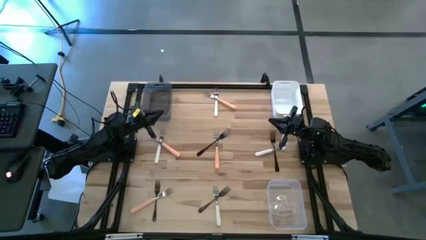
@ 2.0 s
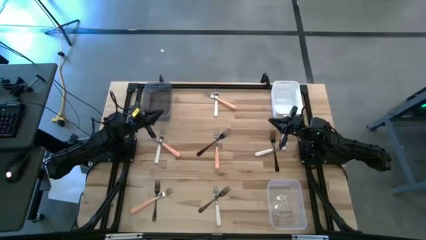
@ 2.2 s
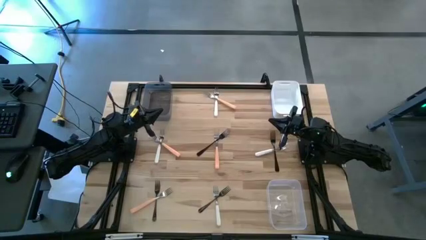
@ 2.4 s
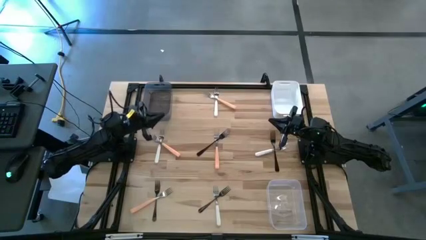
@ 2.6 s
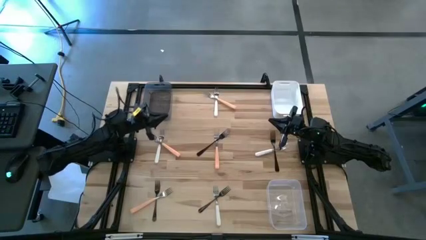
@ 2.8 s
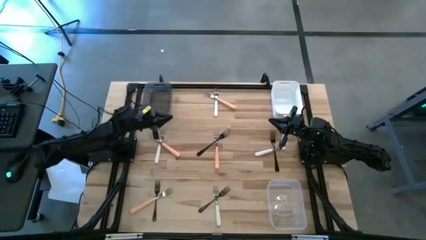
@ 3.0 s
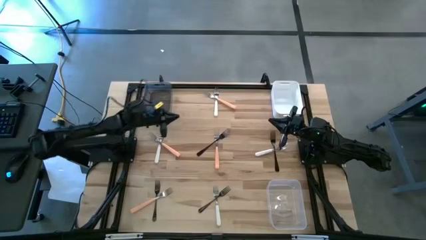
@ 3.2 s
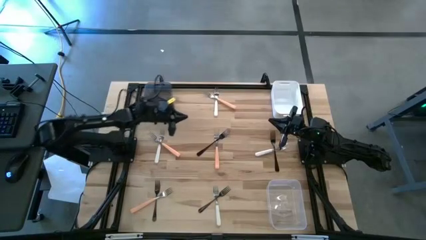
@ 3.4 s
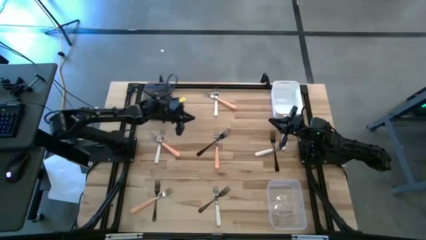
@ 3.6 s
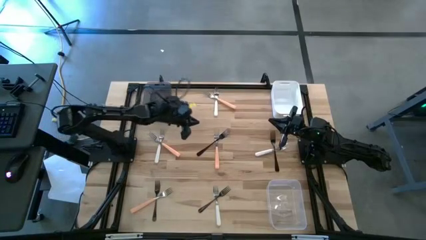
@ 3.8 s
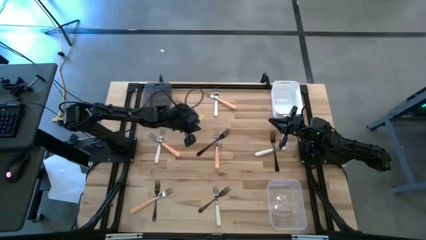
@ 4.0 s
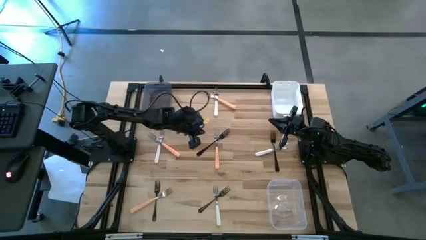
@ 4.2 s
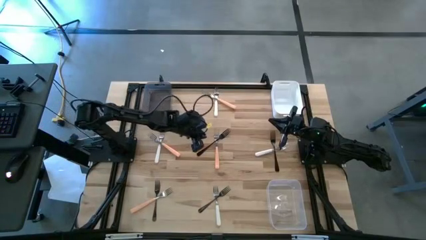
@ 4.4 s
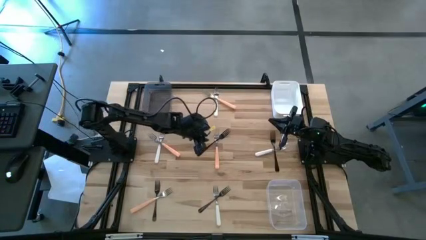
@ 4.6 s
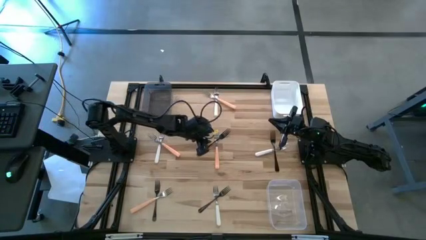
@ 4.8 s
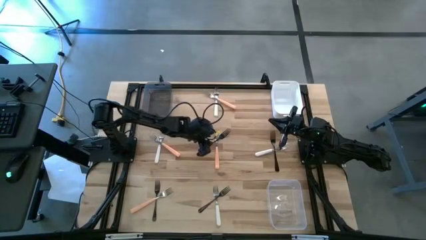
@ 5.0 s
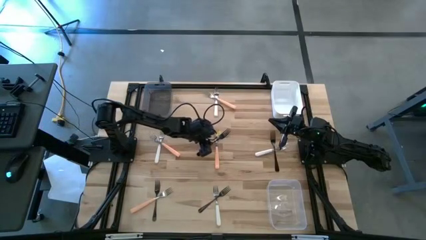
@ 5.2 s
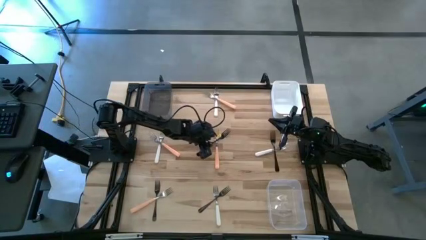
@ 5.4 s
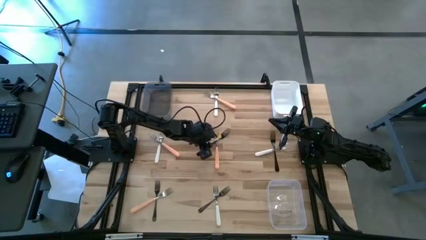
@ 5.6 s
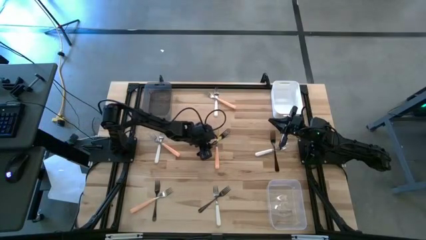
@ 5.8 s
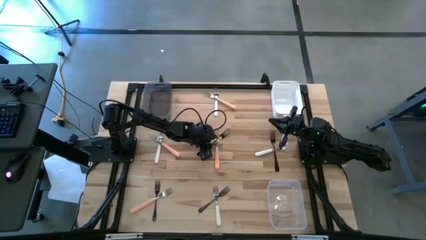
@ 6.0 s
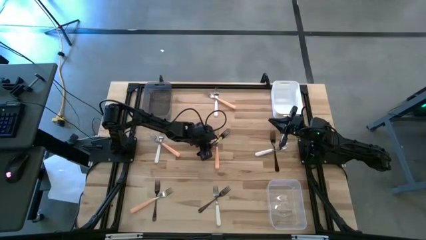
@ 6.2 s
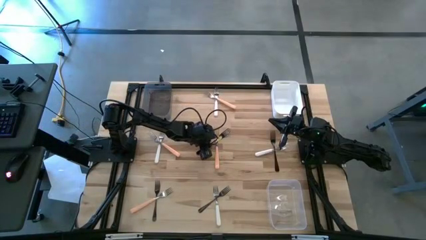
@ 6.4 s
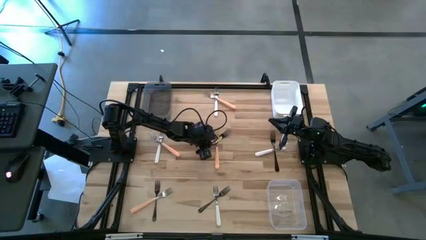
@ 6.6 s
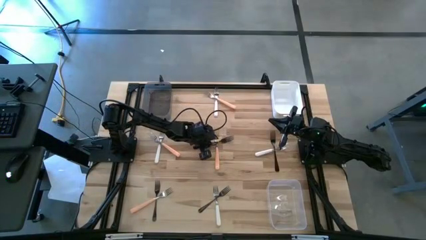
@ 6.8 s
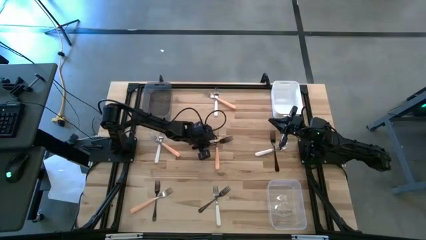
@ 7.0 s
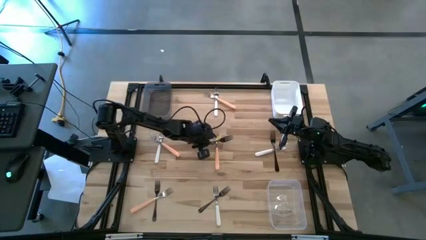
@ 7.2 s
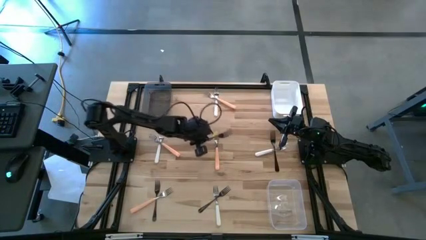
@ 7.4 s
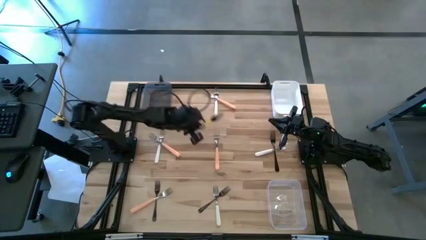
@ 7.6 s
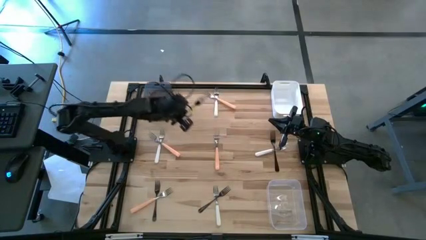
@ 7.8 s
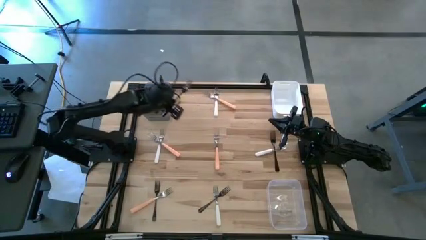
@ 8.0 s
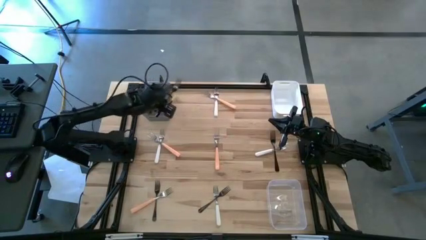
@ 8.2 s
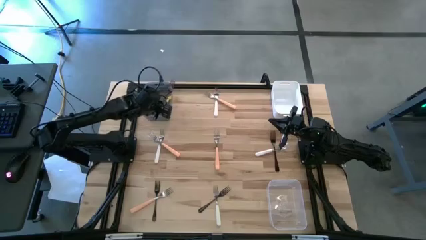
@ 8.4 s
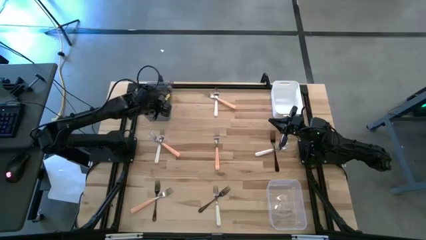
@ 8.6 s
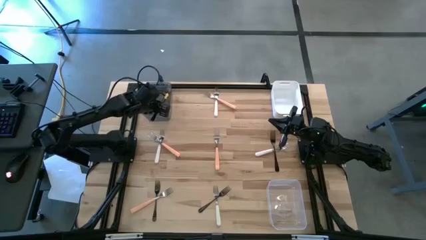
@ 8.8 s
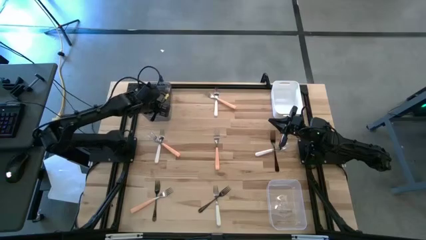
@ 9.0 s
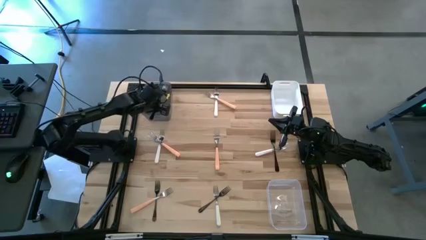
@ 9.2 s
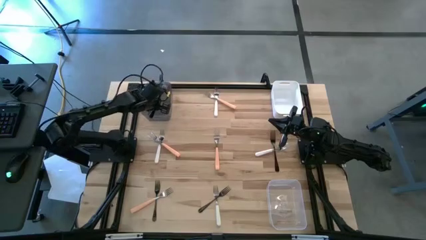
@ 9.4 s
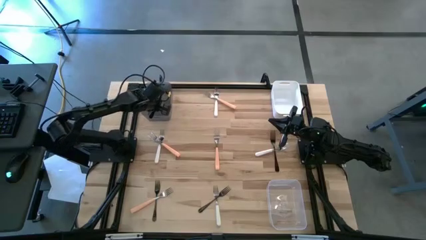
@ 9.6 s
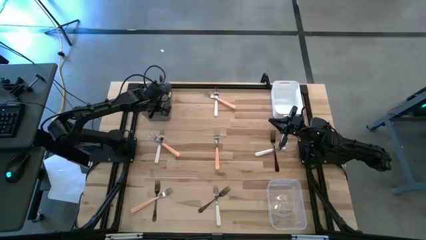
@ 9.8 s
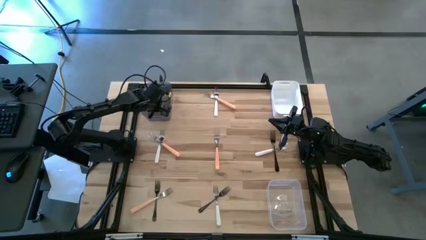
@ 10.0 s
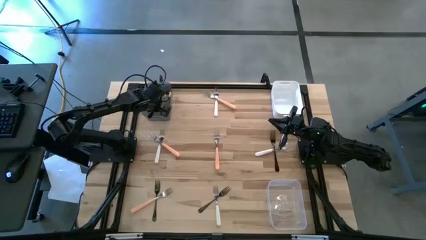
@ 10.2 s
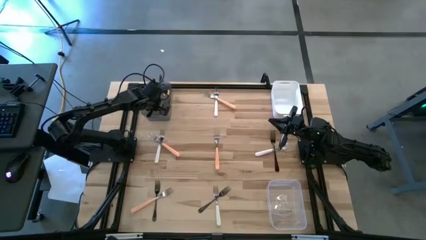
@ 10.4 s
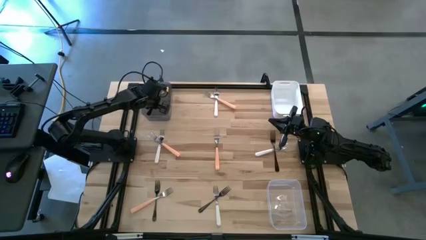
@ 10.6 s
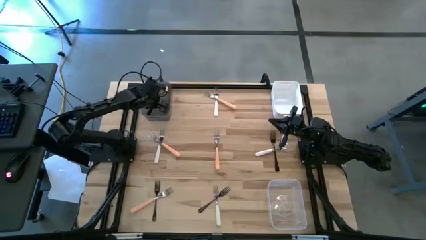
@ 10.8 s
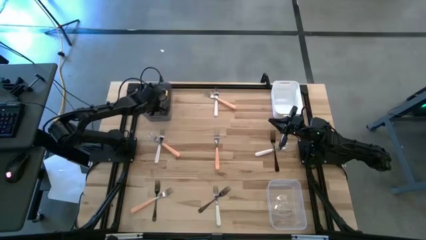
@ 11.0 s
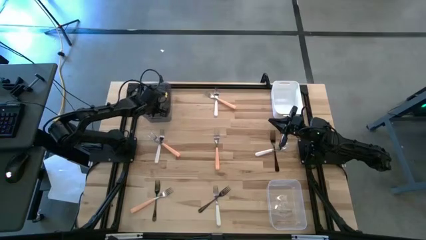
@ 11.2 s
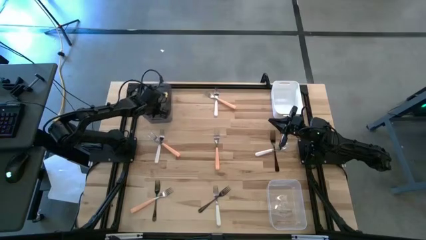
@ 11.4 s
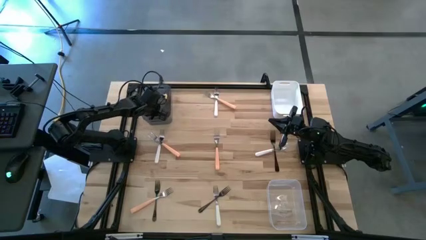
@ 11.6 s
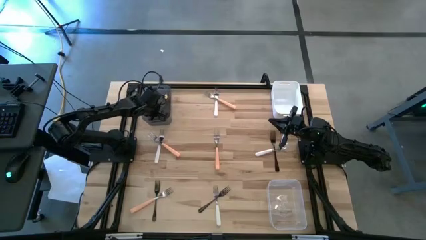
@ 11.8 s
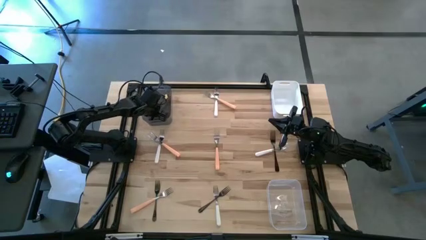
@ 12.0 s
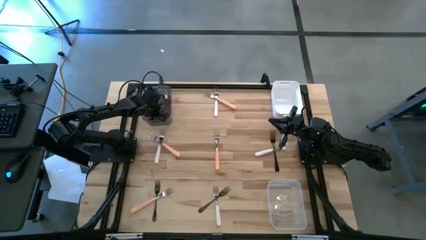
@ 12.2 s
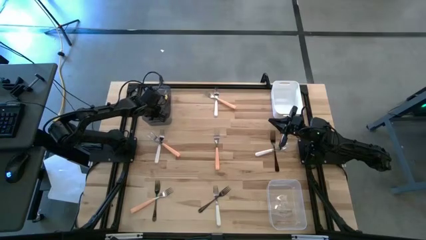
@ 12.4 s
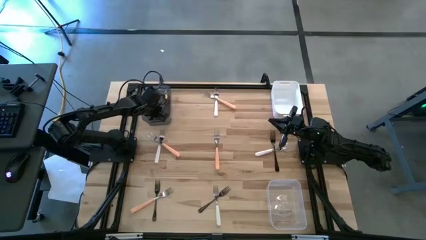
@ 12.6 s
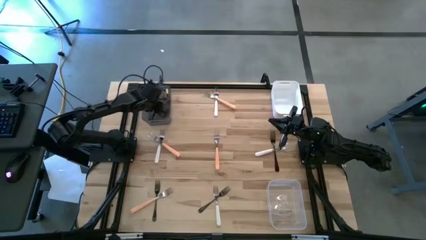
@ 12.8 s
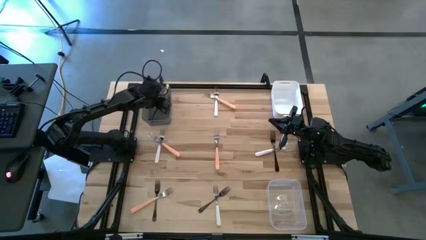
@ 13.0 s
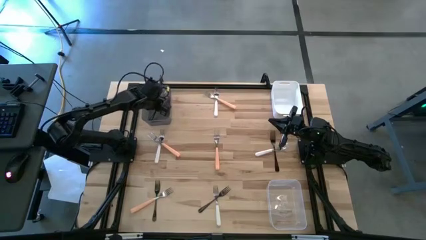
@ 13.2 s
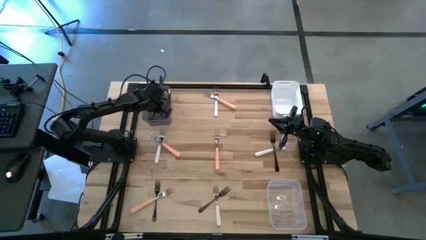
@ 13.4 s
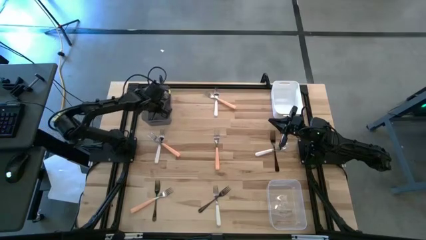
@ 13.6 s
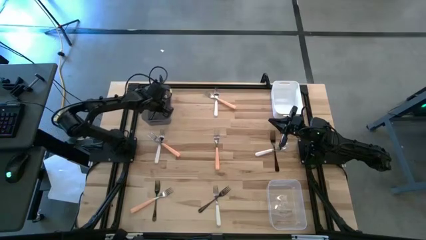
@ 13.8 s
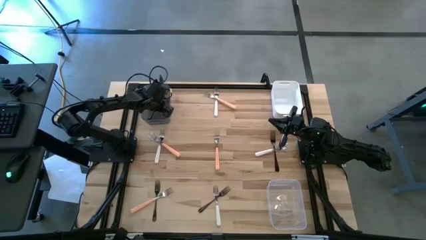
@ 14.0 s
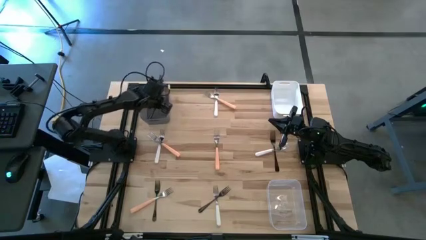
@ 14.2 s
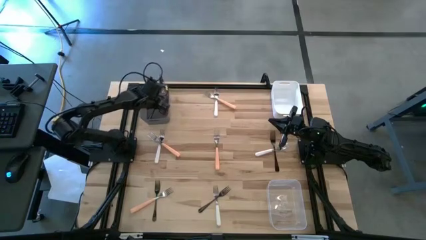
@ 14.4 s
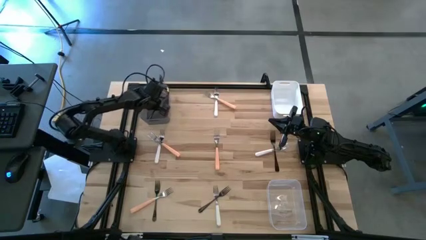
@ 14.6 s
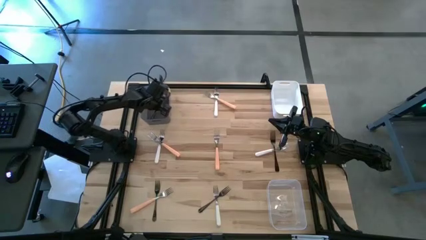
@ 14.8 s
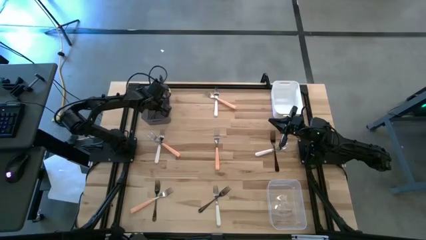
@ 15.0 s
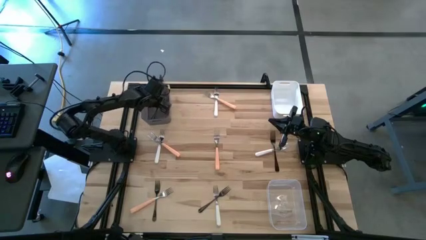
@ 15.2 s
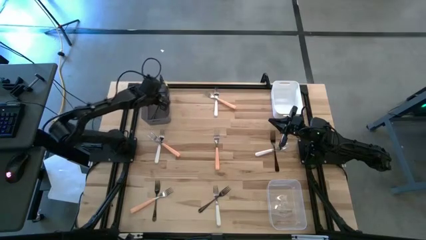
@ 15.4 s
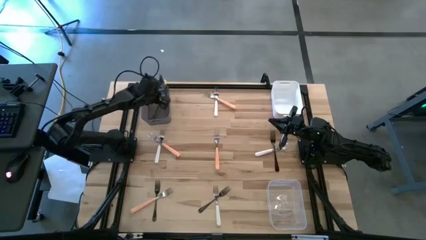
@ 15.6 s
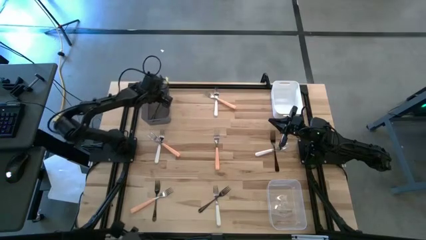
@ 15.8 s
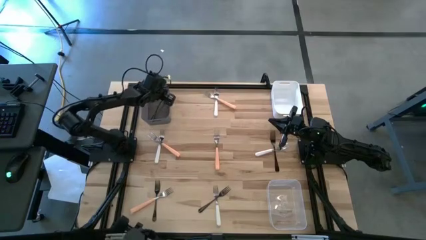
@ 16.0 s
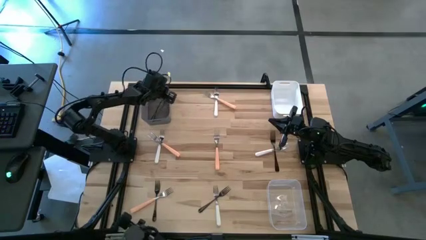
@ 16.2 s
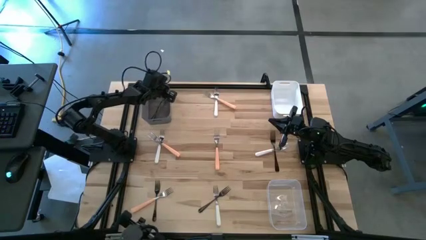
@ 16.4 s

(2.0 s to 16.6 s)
Task: Sort silverware by color (type)
Put the top left black fork into the black bin
